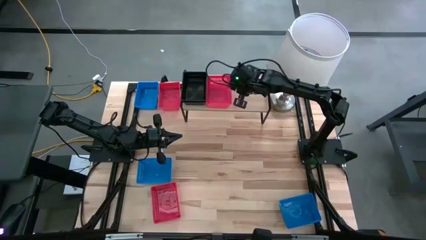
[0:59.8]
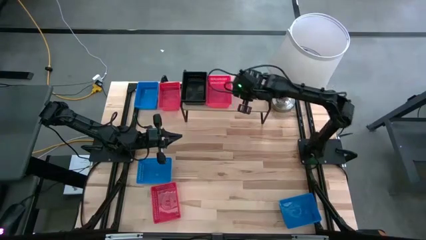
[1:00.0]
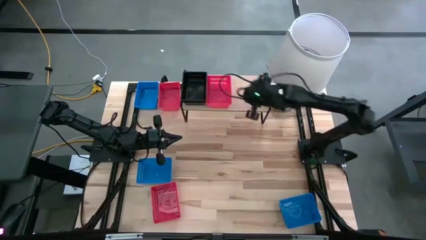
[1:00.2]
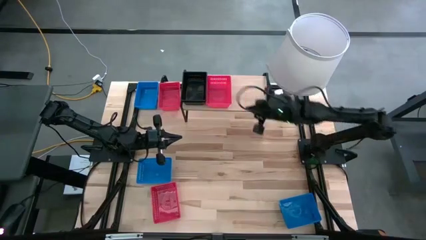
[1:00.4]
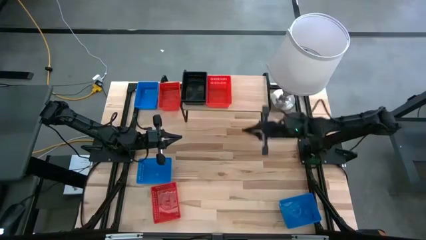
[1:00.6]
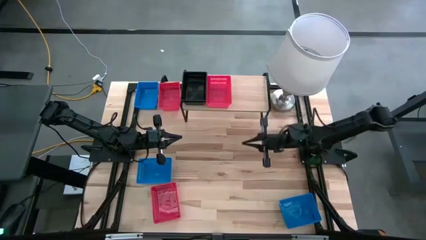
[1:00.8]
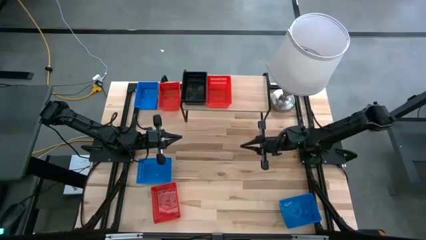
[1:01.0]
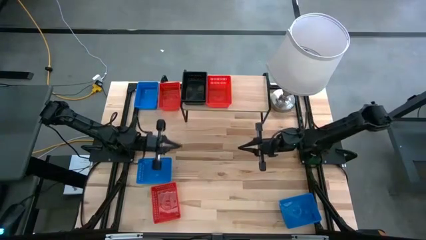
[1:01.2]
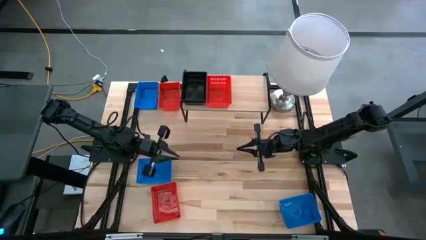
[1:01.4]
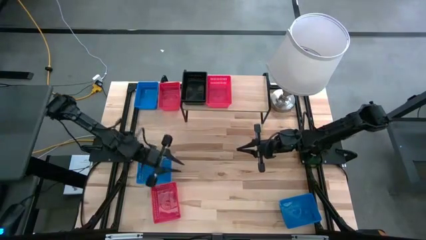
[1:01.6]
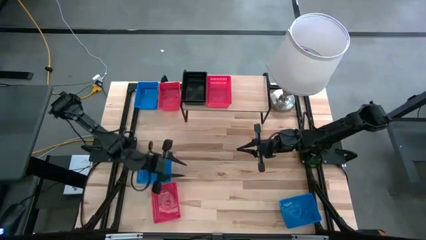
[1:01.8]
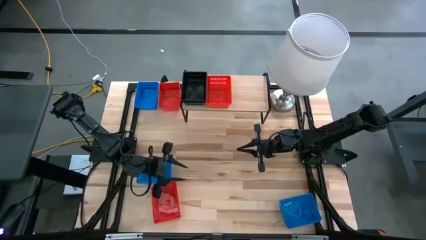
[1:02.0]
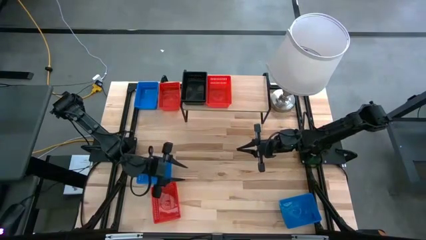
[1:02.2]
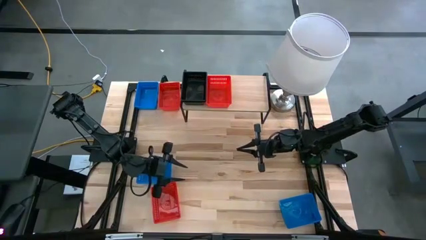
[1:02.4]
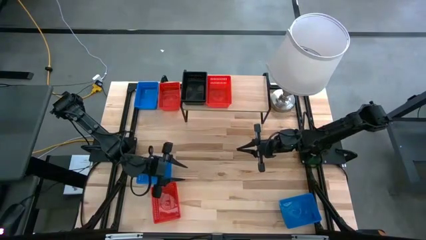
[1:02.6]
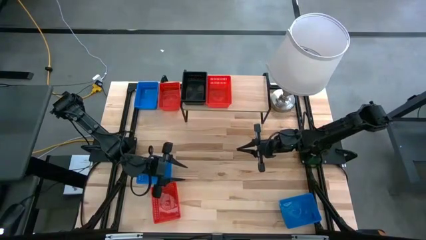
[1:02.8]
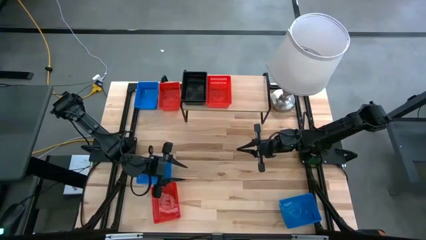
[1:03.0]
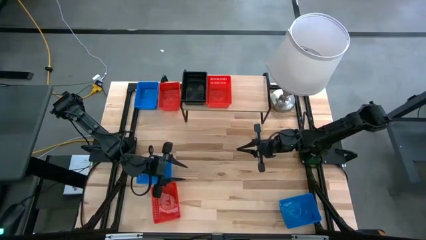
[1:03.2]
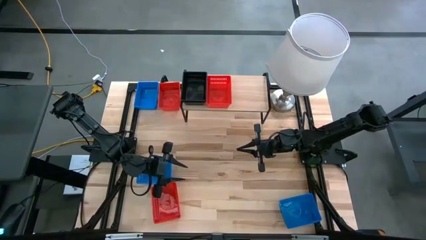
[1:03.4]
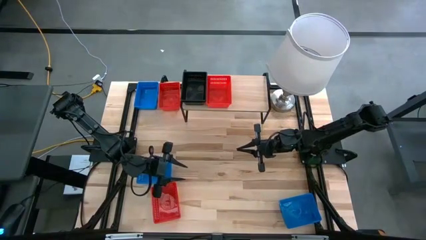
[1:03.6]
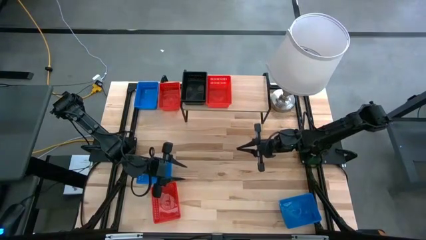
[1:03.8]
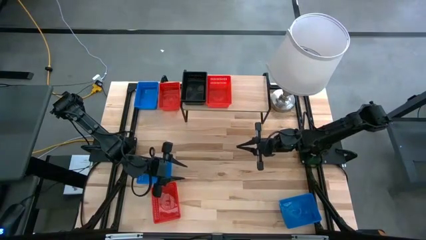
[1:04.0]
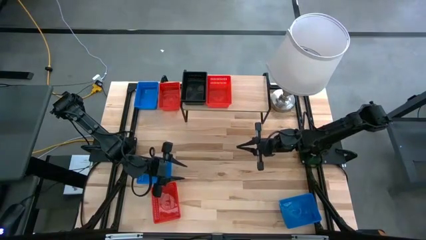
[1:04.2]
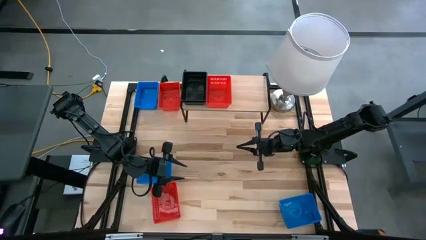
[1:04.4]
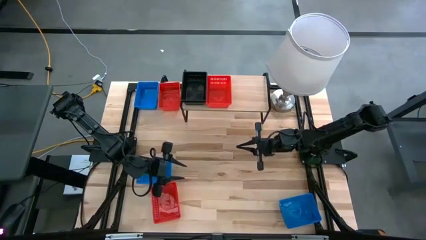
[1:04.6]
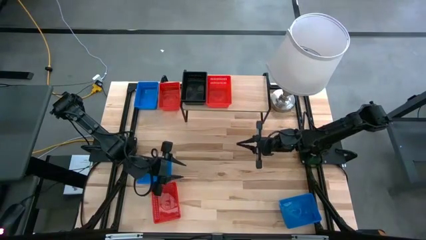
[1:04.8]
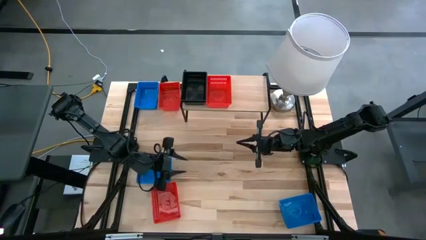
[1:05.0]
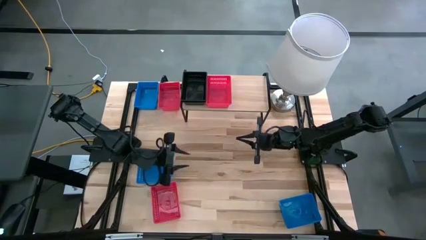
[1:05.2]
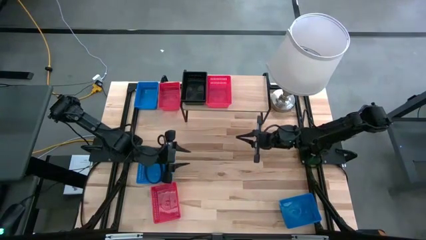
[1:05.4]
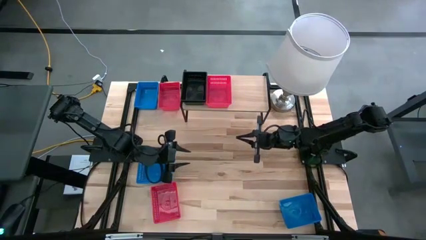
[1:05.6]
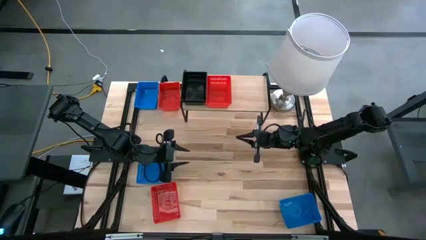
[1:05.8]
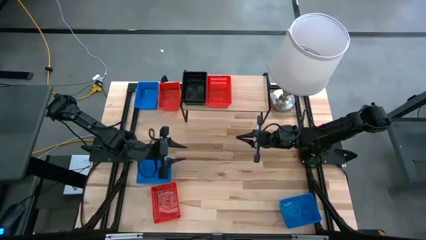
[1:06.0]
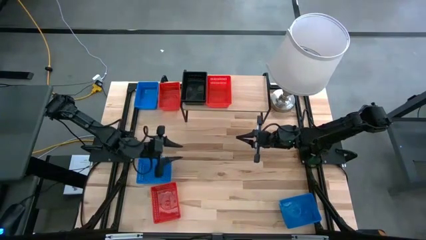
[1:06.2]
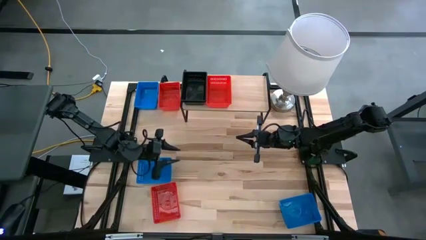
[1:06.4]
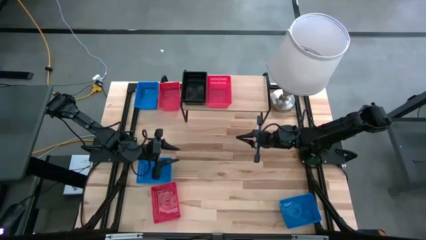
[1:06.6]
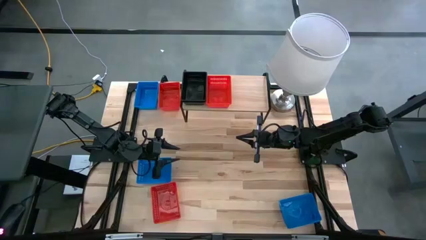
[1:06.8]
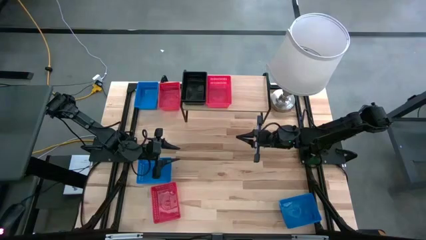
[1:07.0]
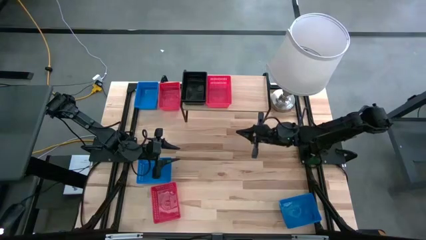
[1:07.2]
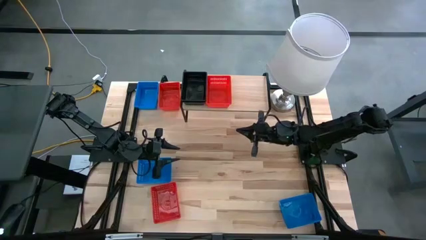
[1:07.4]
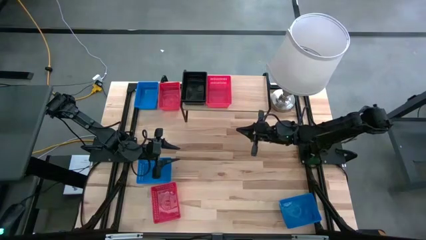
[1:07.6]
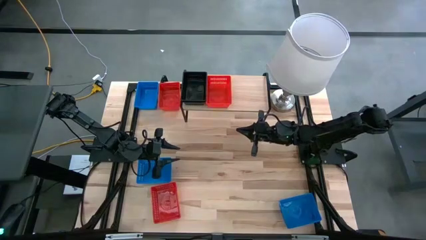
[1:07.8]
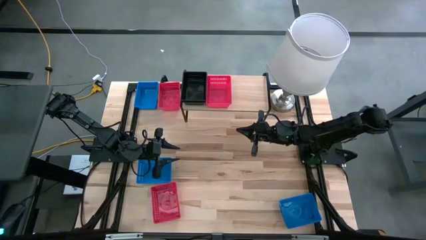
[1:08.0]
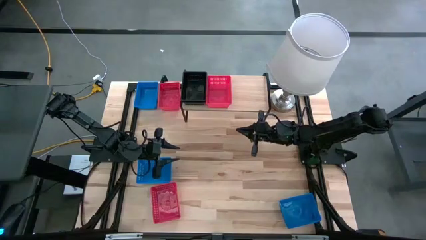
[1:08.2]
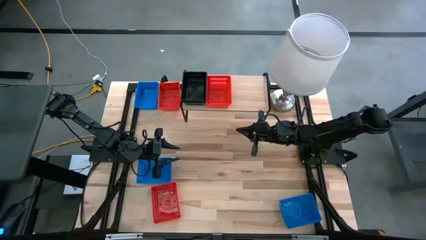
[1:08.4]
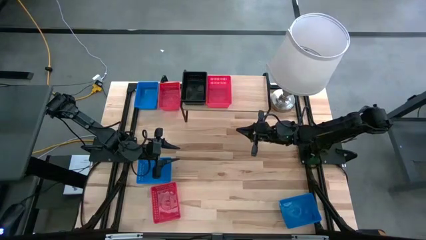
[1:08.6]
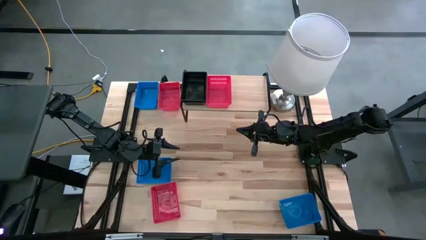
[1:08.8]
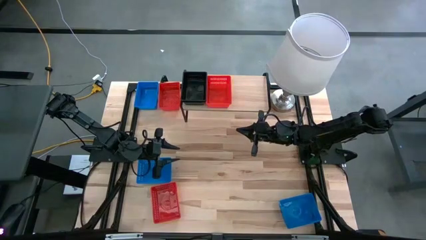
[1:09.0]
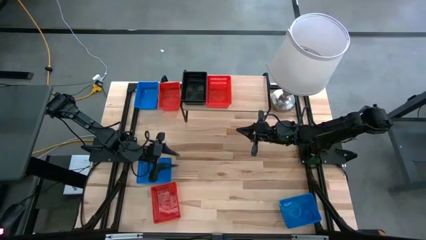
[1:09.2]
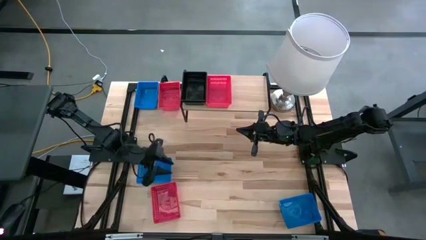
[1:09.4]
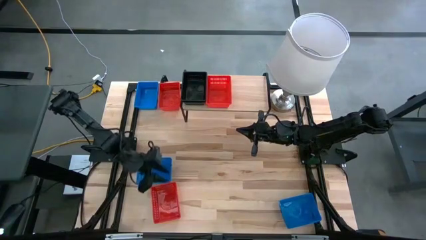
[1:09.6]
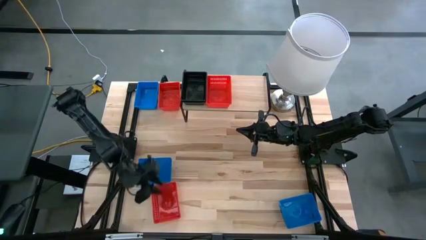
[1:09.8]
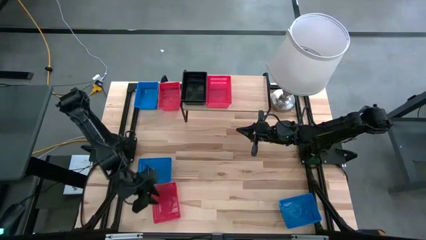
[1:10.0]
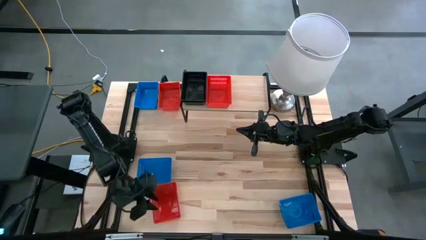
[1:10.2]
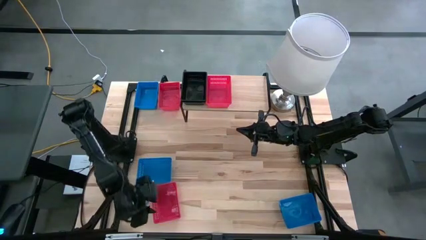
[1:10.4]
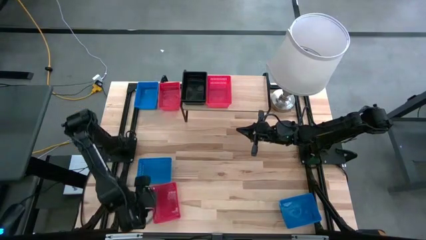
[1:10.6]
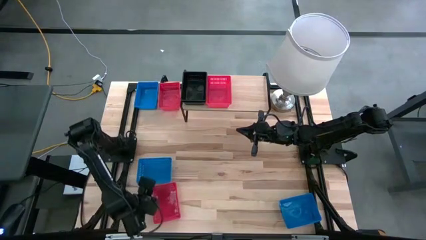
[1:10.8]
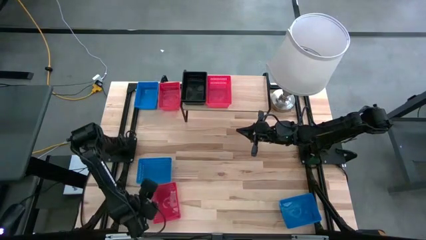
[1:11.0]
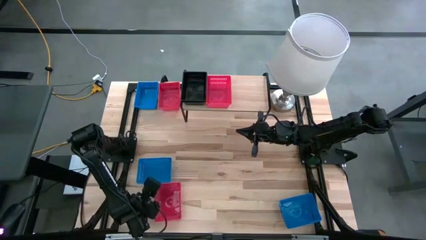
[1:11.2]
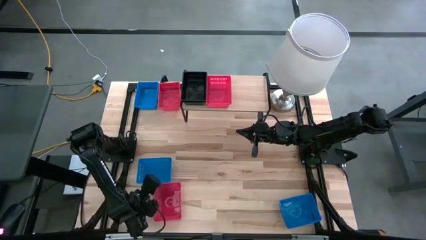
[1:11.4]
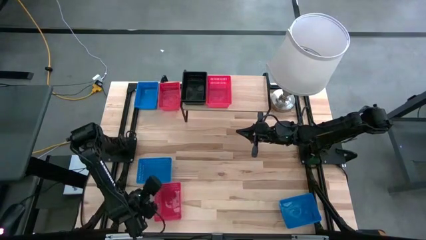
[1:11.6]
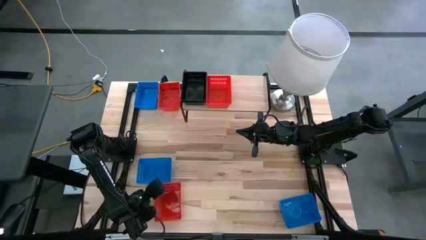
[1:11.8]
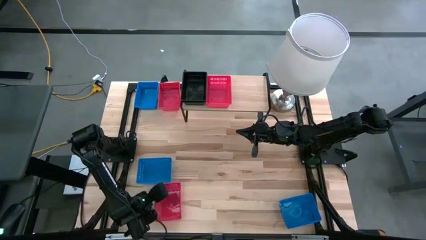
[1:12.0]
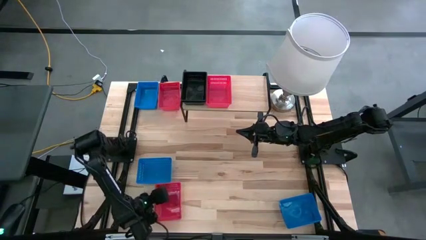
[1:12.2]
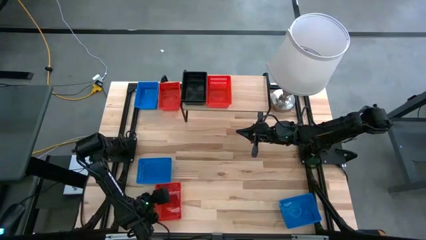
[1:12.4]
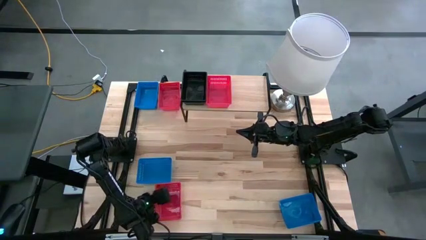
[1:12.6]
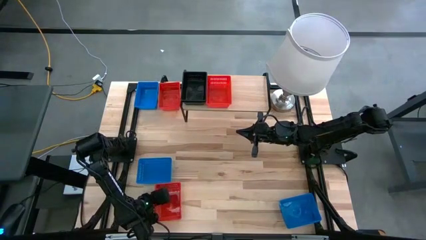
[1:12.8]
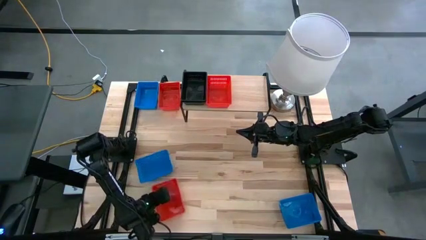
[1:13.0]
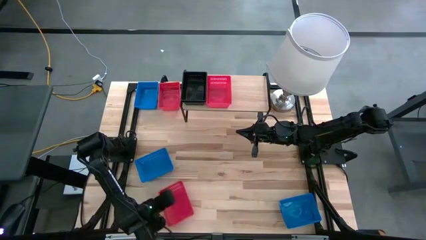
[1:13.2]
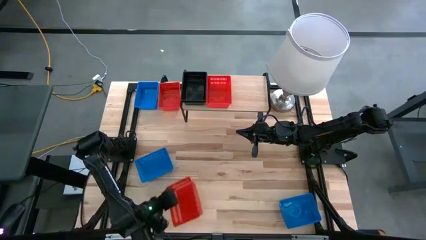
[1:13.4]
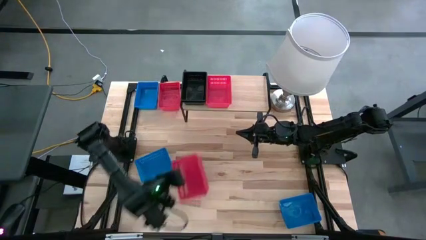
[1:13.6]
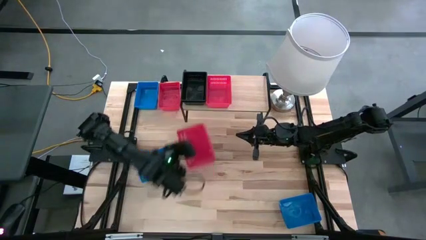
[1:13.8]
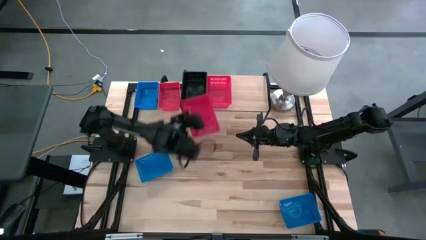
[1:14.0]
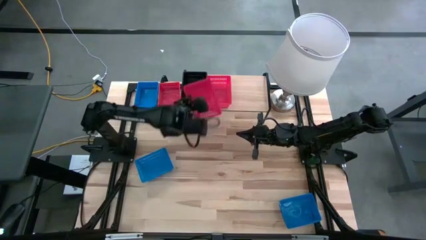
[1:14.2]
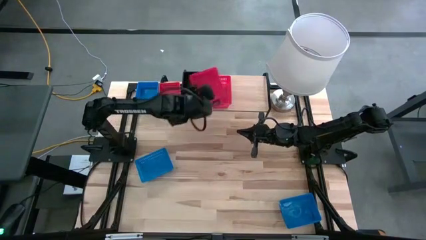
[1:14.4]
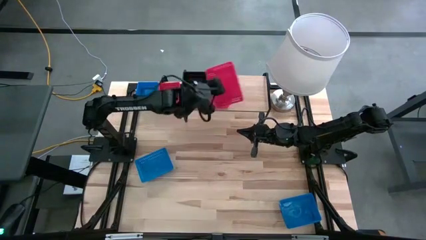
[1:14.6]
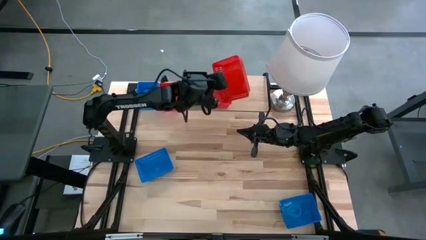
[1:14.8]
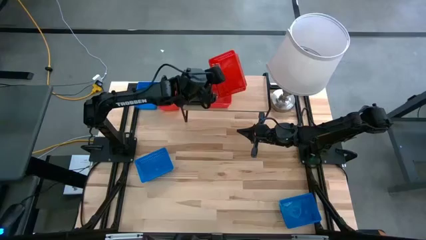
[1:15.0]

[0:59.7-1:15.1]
Task: Stack baskets on shelf by color
Stack the bottom red bin on top of the red bin on the shelf
